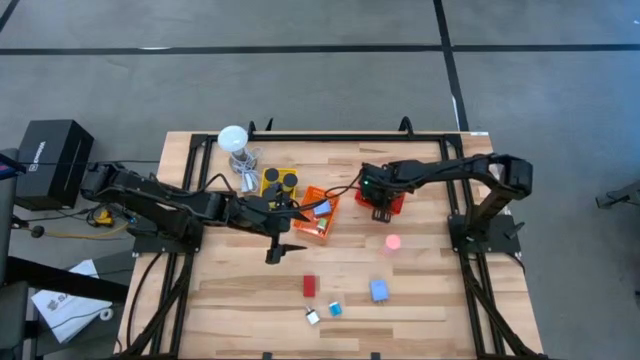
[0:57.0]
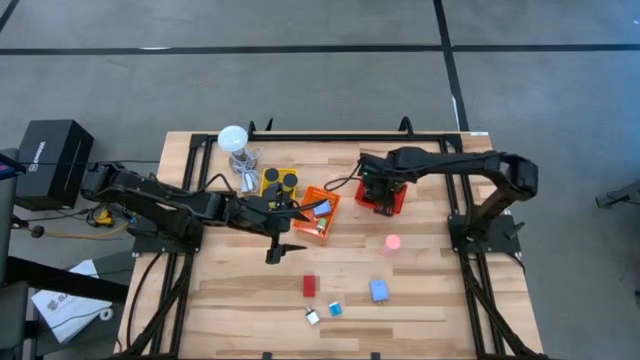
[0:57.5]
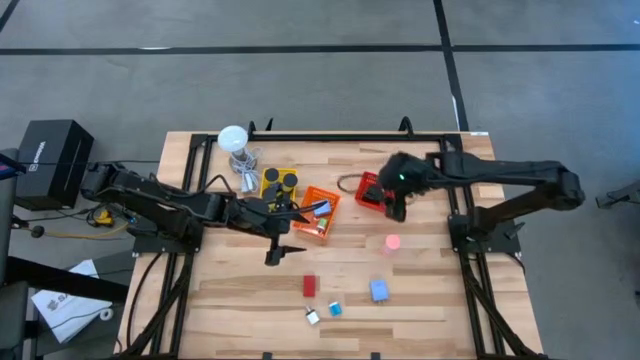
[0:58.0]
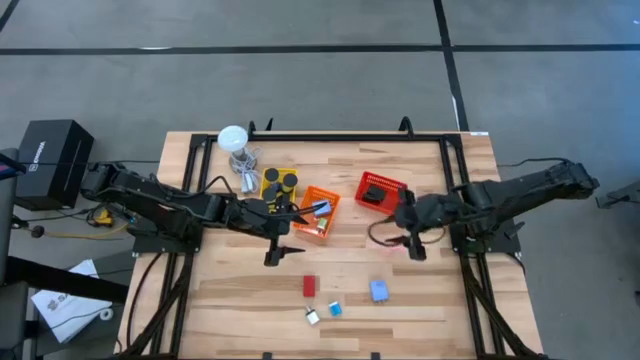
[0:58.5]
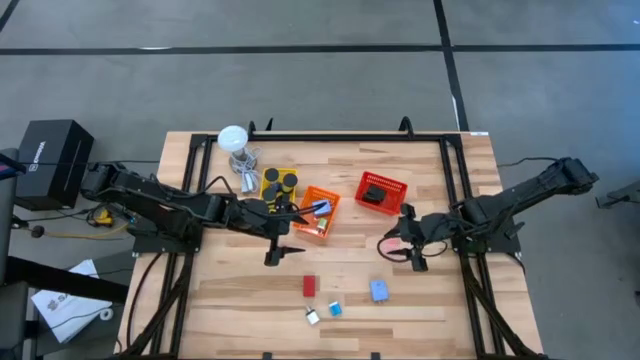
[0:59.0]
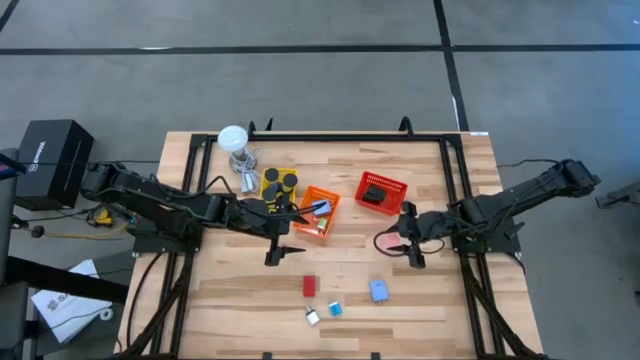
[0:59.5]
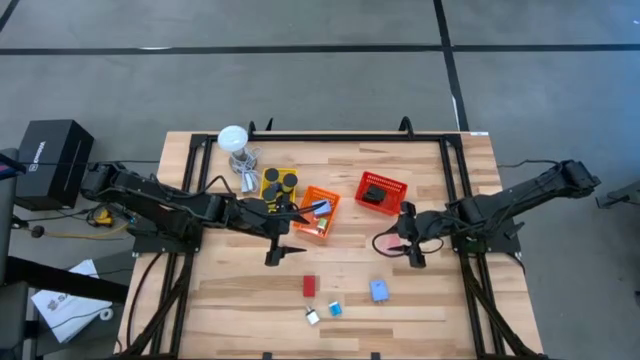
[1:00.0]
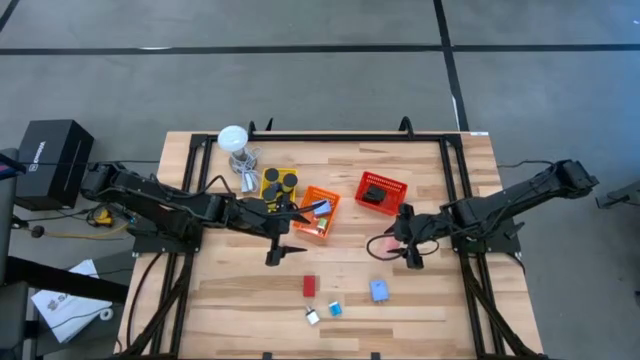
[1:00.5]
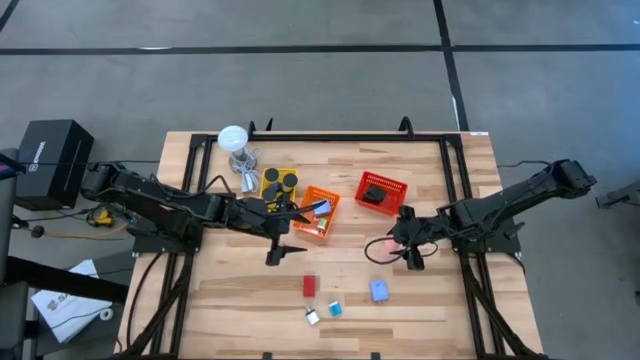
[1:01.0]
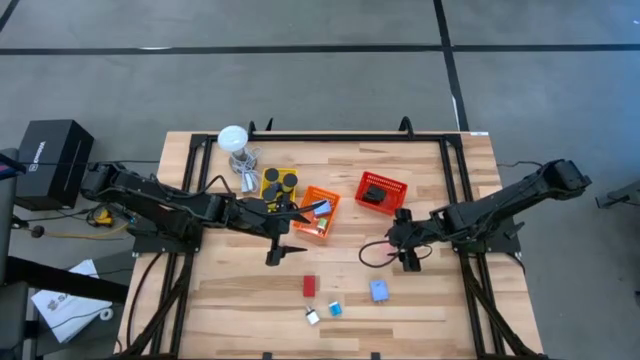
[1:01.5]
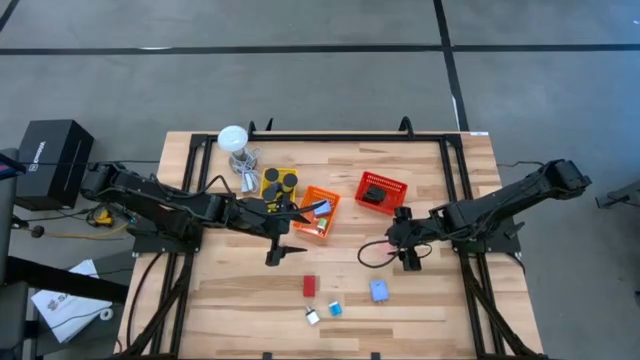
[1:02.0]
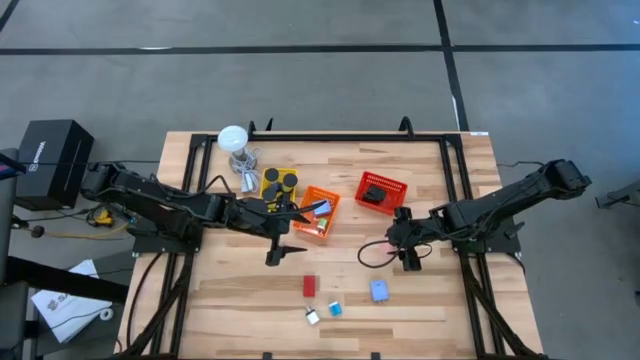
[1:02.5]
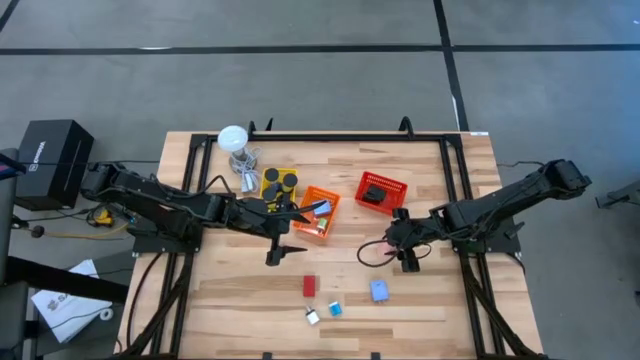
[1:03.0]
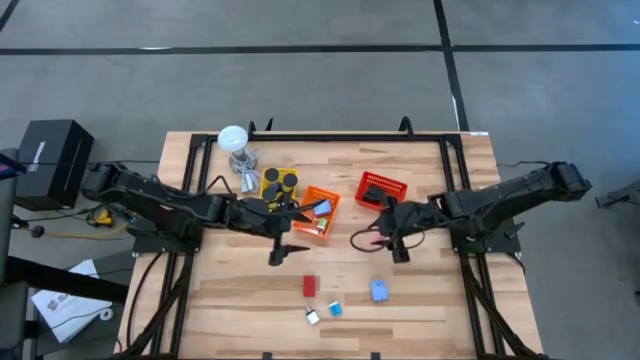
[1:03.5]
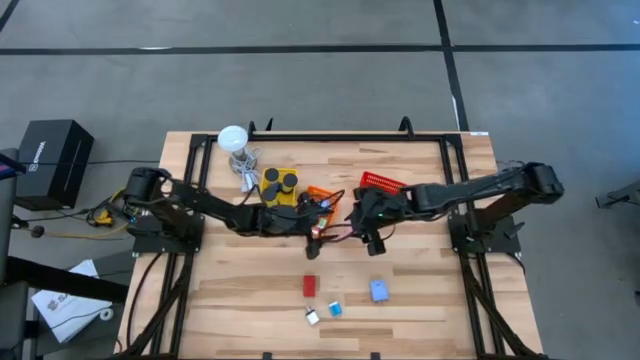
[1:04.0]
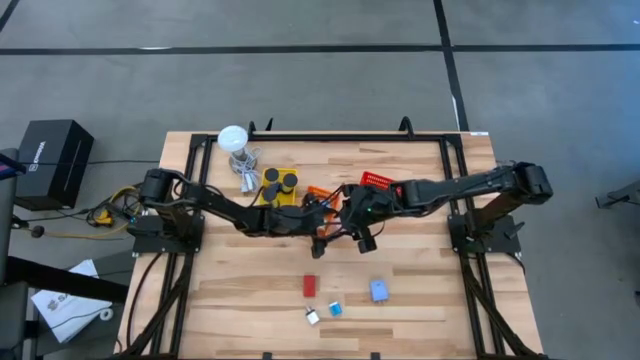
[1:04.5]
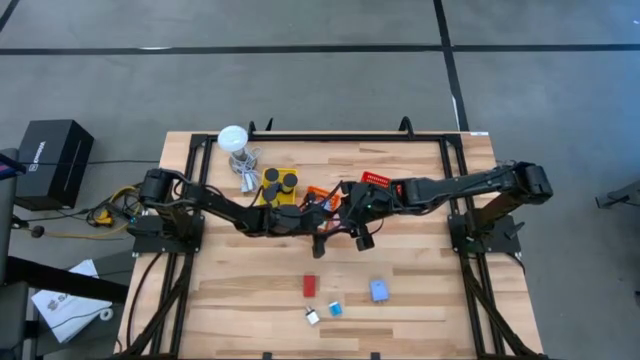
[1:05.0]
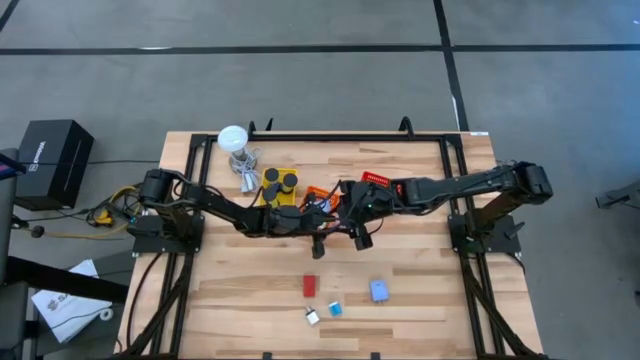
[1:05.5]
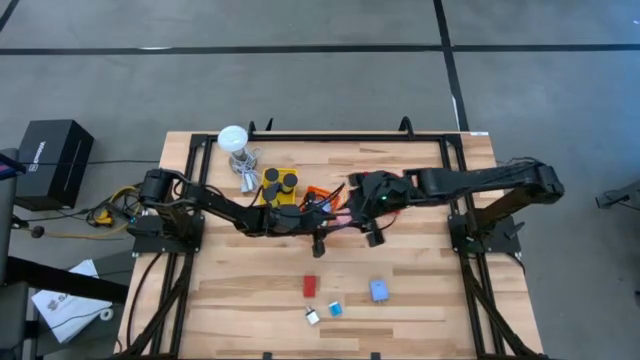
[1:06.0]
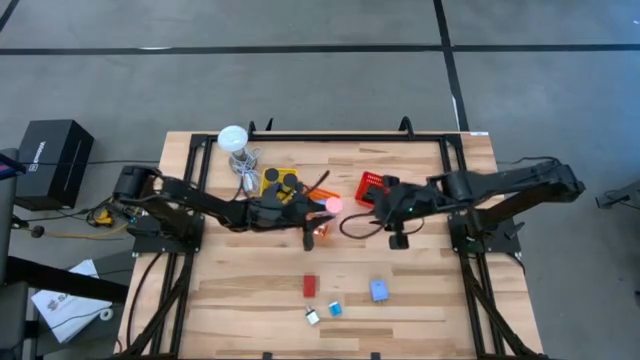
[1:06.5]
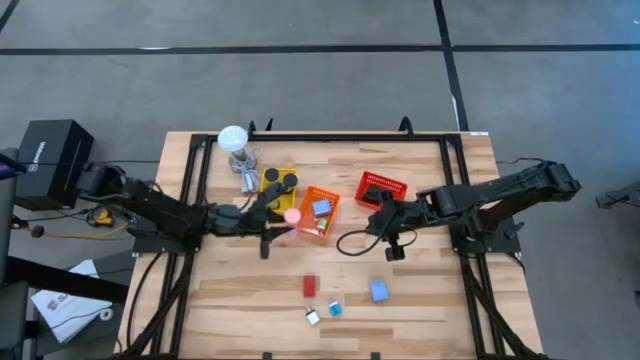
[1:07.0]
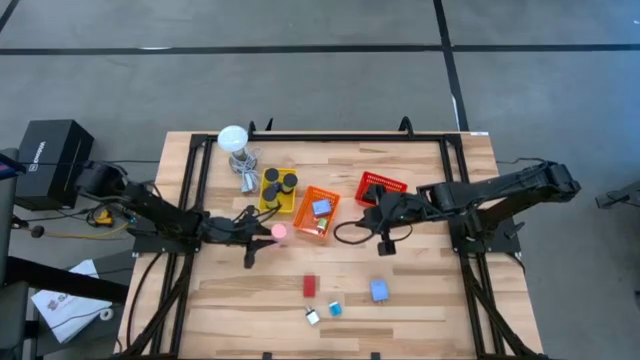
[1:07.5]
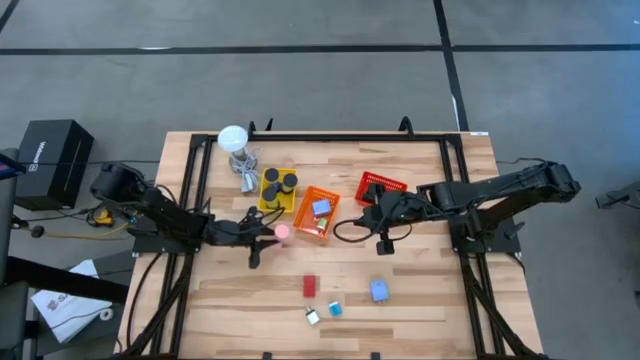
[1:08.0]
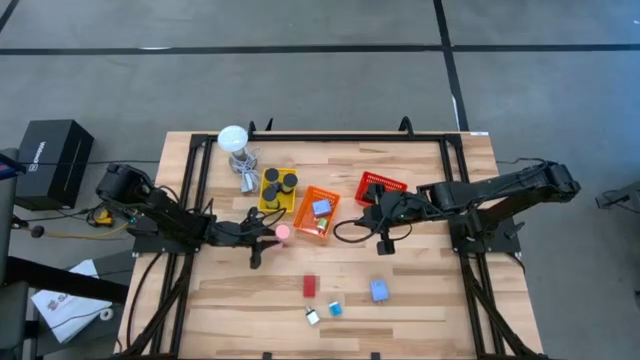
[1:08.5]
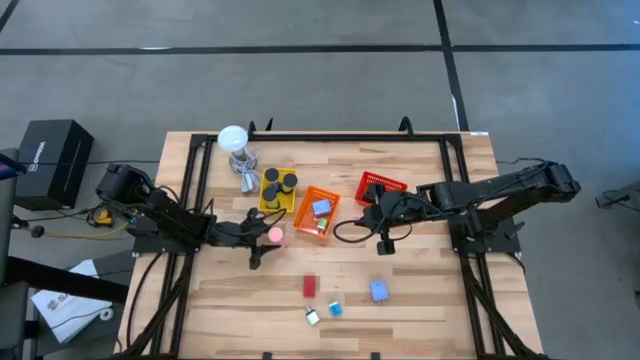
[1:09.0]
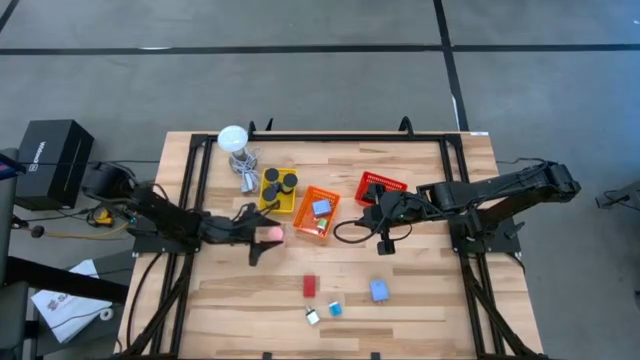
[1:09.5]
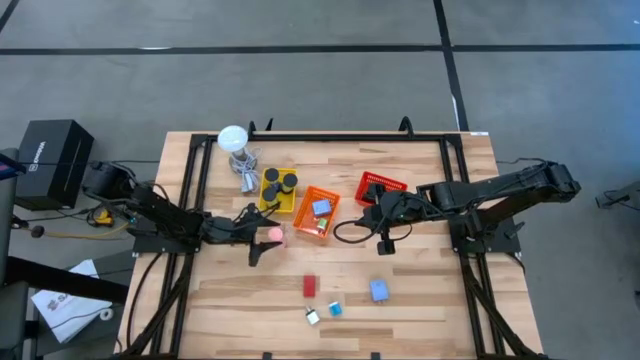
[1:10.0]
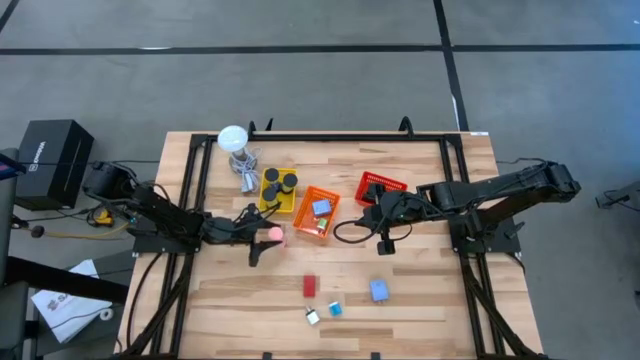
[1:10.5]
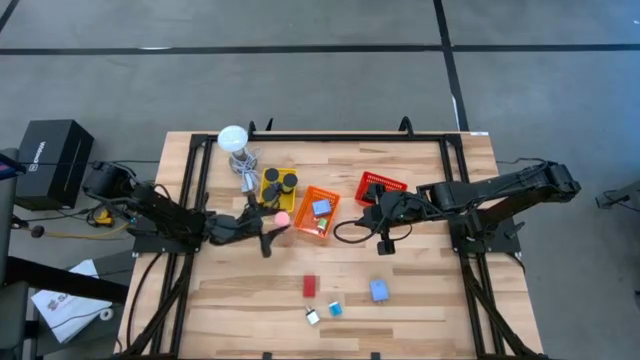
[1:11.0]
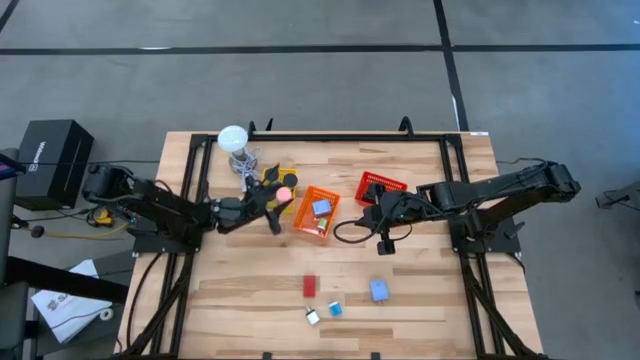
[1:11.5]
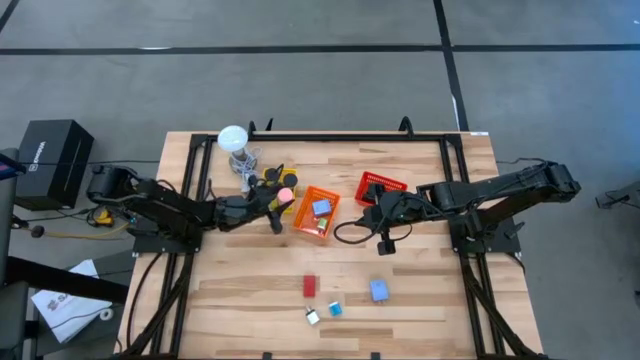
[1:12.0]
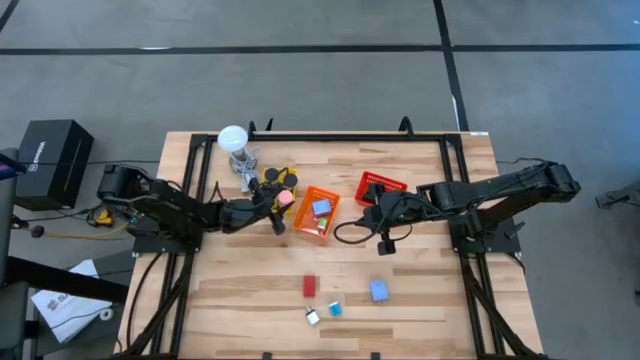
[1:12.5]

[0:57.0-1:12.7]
Task: Pick & Place Office items
Put the pink sand timer into the yellow bin

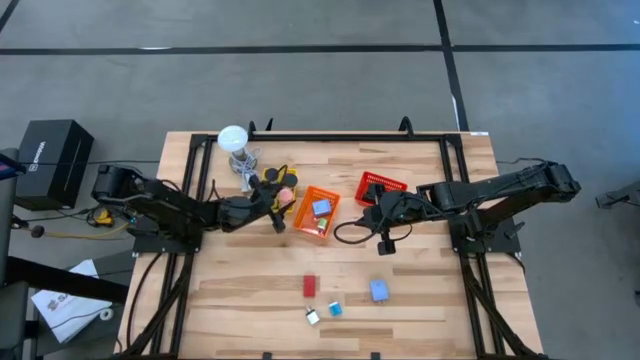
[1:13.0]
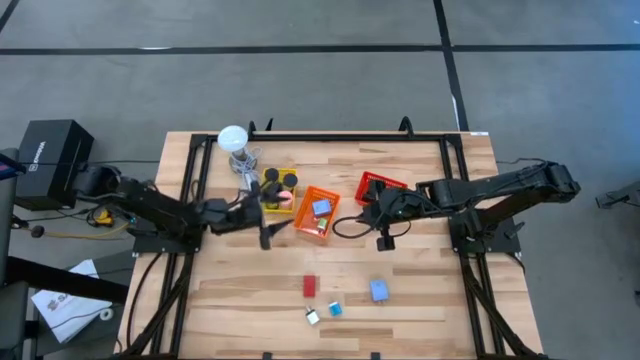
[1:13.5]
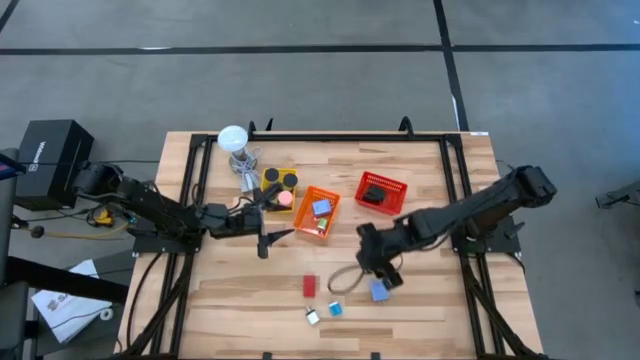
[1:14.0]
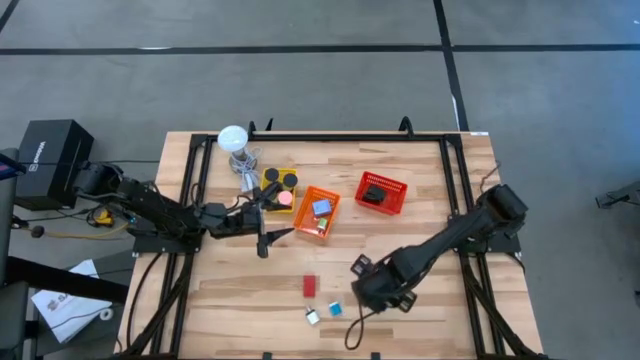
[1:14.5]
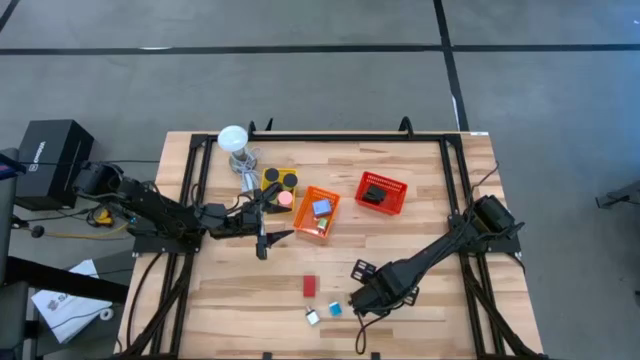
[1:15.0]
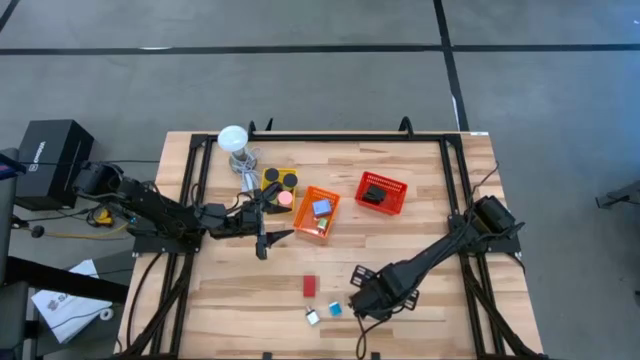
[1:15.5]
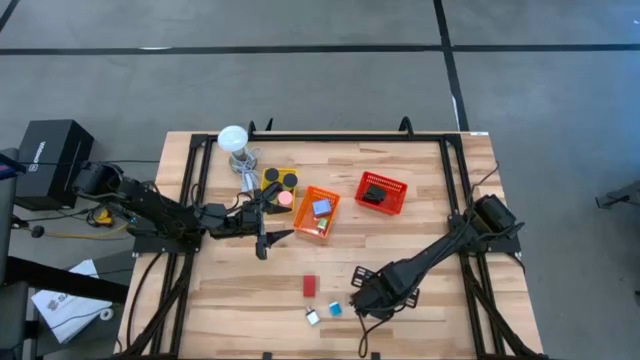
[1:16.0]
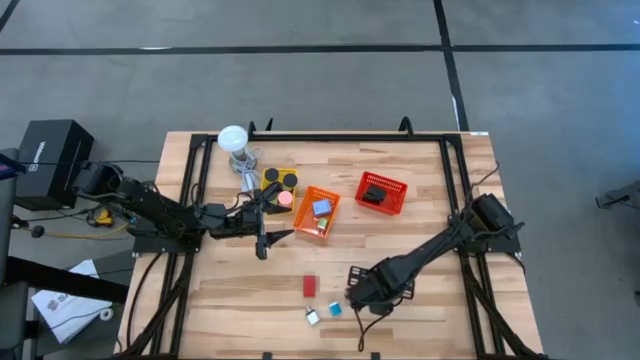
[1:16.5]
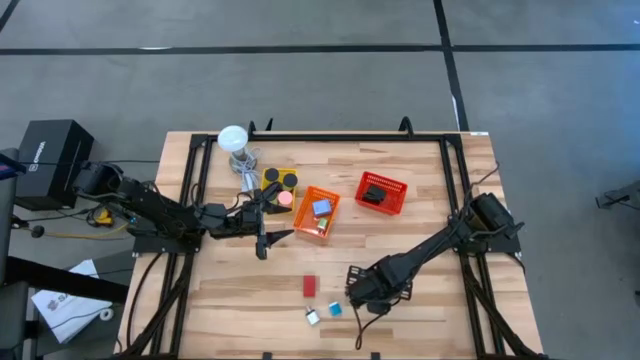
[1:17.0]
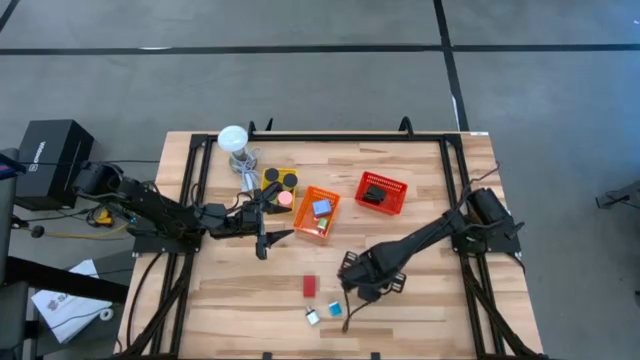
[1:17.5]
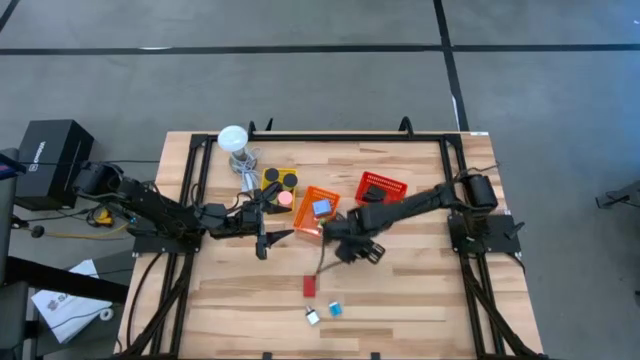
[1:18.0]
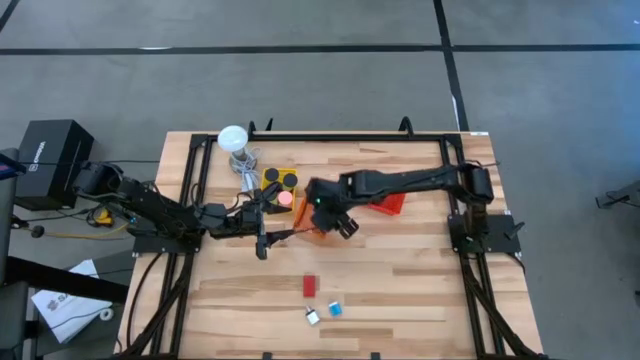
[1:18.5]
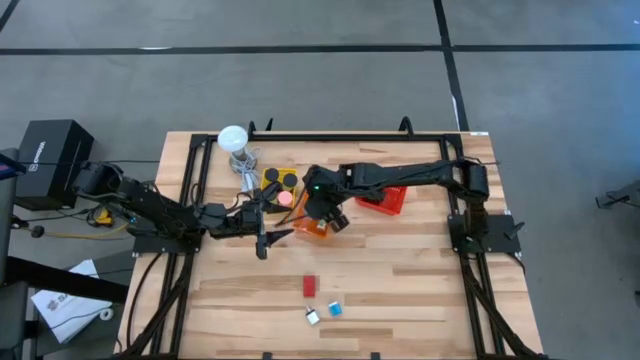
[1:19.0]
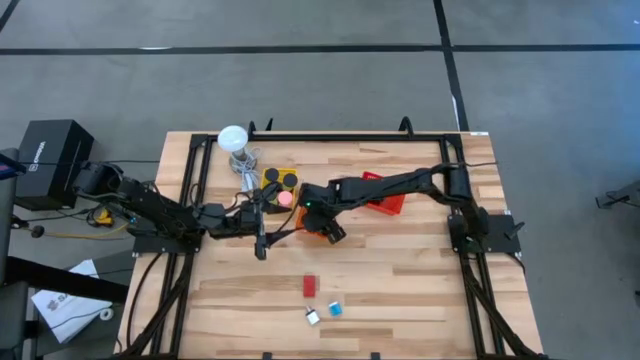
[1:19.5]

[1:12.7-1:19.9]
Put the light blue charger adapter into the orange bin
